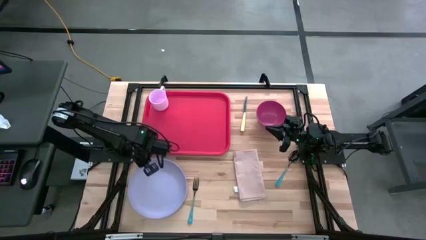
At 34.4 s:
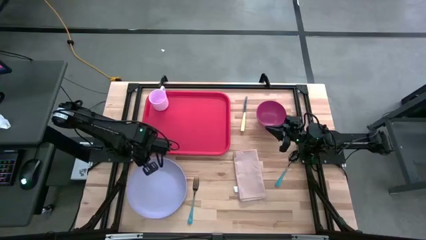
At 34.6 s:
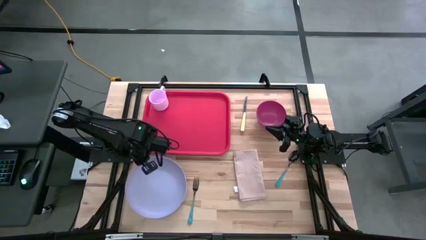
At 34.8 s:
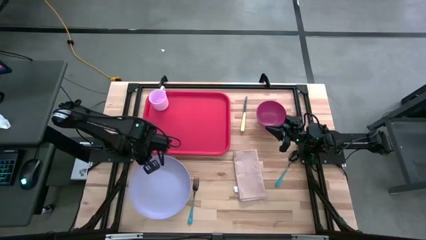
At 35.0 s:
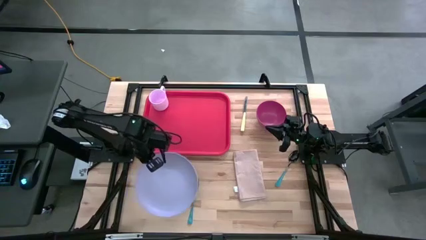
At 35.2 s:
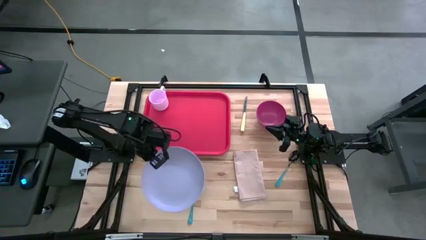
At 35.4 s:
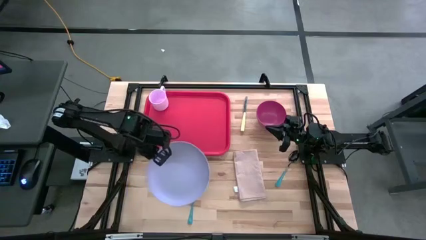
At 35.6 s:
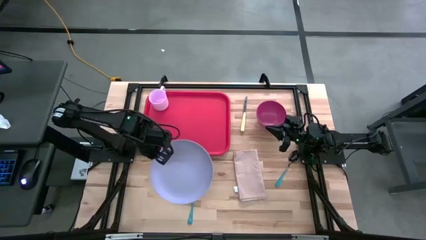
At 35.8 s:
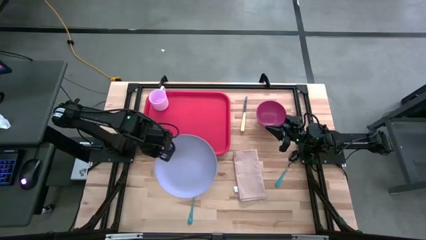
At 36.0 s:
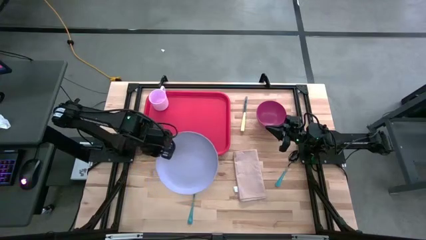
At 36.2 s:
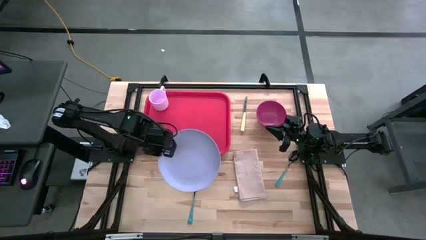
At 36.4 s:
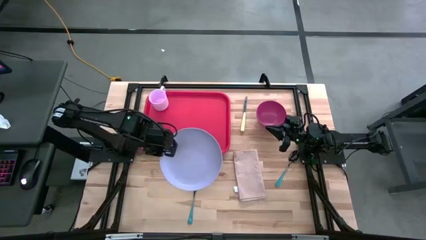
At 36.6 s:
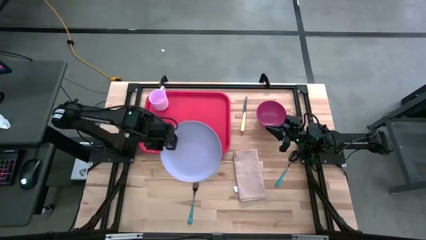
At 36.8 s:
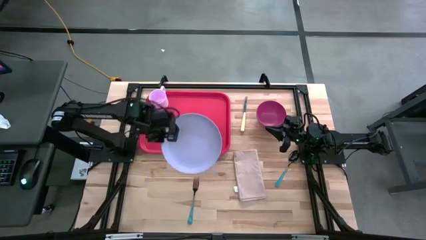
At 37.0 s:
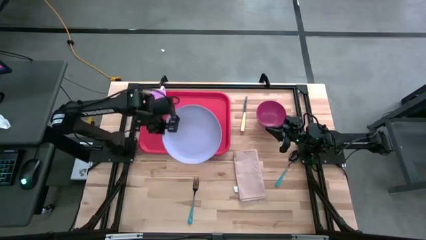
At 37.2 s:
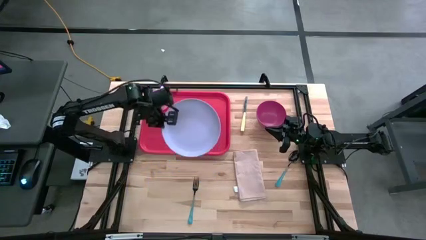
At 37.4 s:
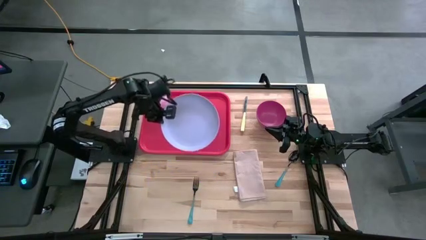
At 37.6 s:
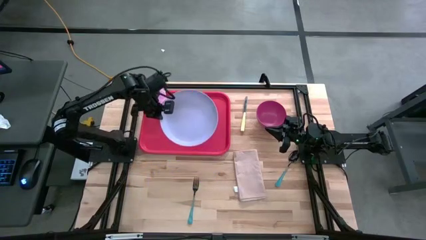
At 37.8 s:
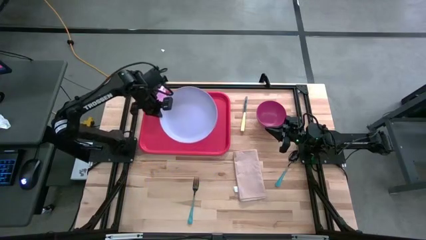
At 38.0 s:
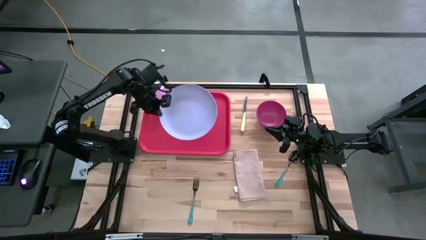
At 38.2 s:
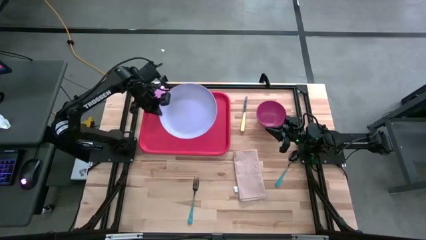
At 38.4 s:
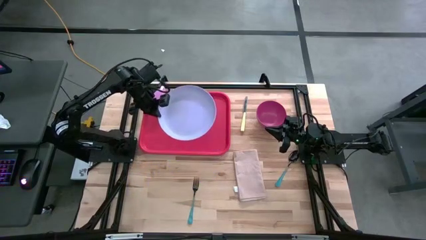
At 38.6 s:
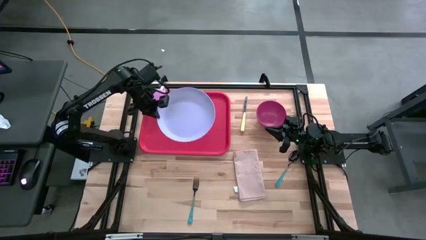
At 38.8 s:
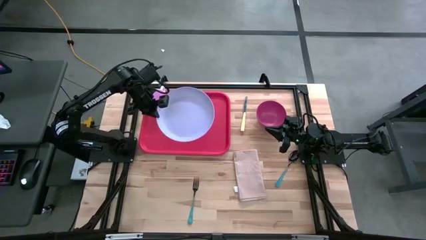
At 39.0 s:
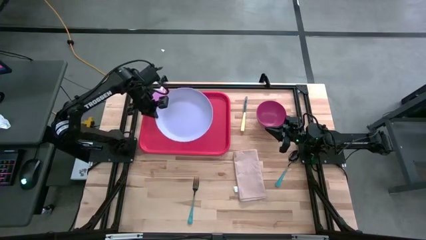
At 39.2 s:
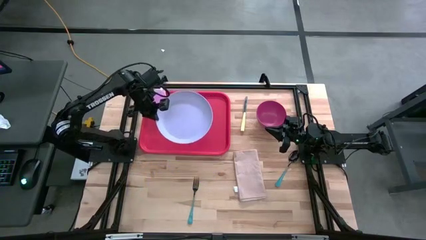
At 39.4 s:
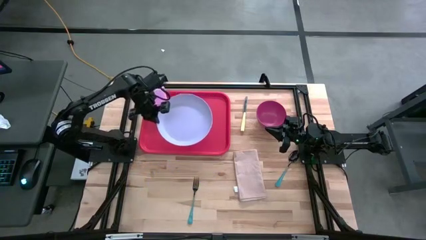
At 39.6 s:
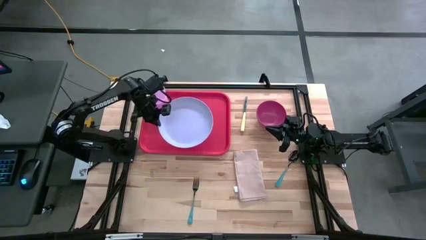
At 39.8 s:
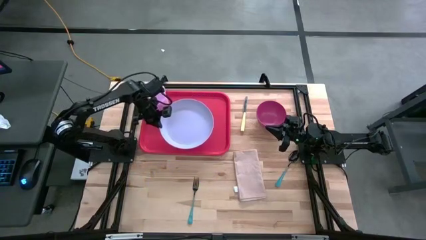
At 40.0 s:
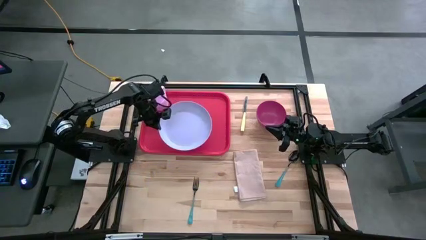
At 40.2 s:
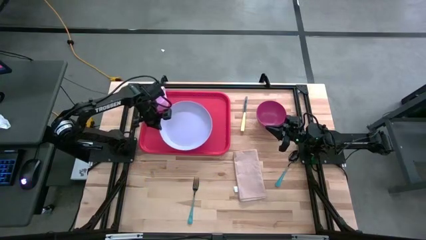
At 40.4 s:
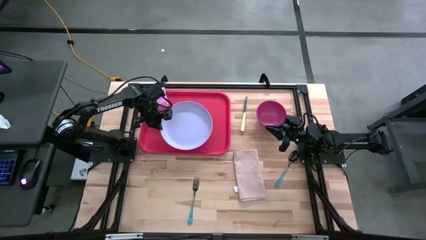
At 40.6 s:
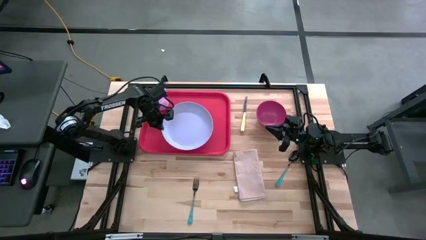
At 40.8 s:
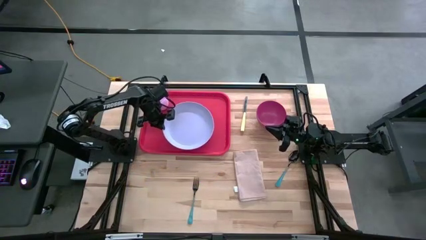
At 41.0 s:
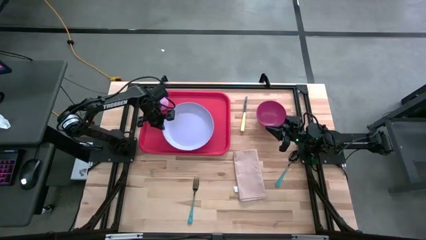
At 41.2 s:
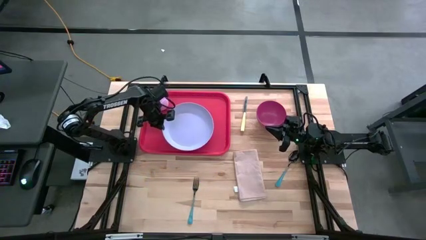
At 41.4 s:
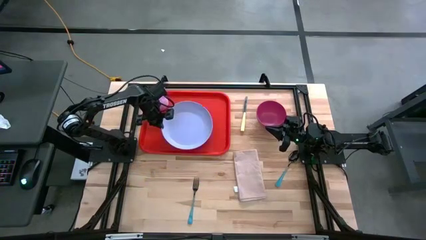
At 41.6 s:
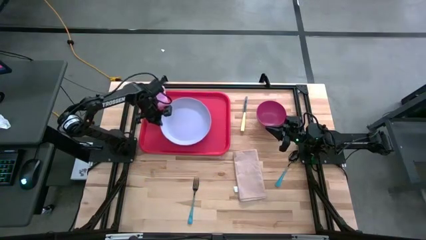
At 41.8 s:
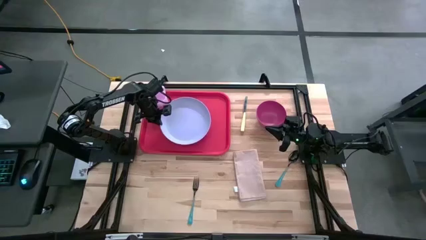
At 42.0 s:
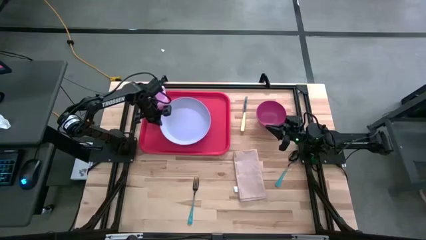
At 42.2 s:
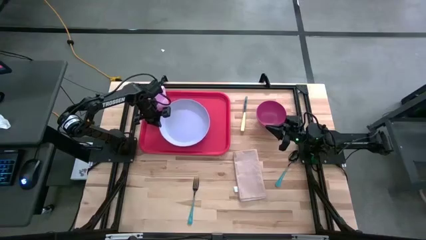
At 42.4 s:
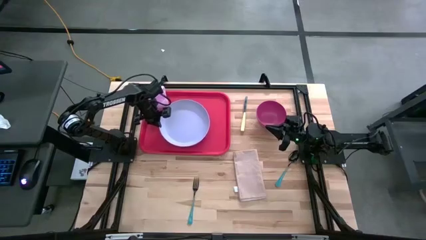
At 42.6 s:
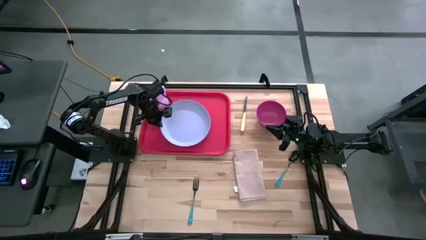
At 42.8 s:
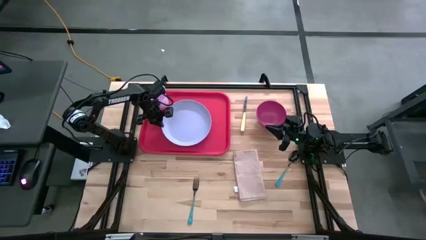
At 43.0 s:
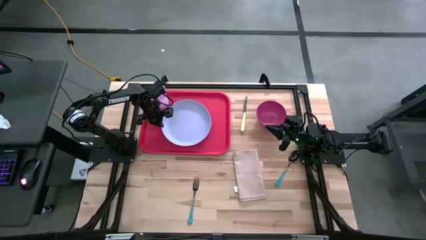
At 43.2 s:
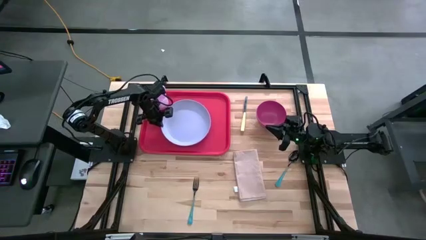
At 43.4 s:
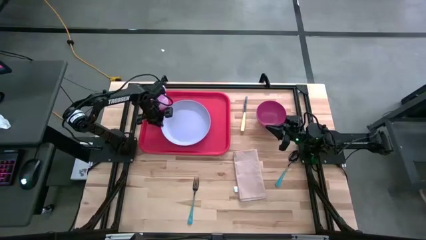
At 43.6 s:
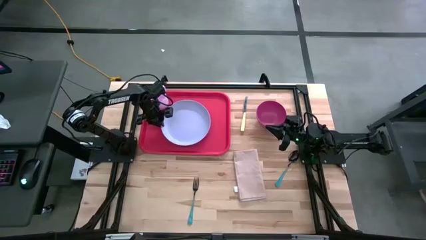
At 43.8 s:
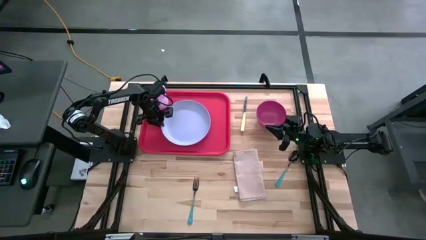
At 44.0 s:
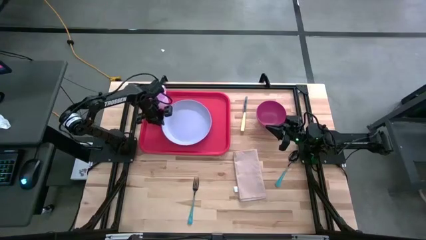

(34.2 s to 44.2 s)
Task: Set up tray
Put the purple plate on the red tray to the bottom right of the pink mug

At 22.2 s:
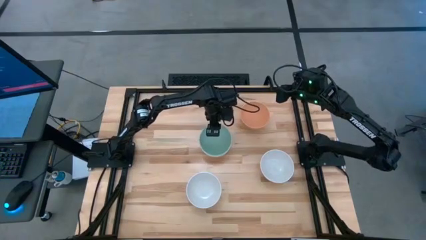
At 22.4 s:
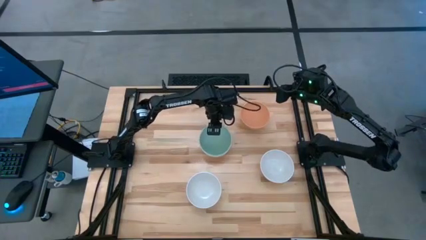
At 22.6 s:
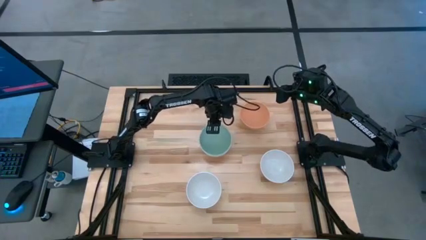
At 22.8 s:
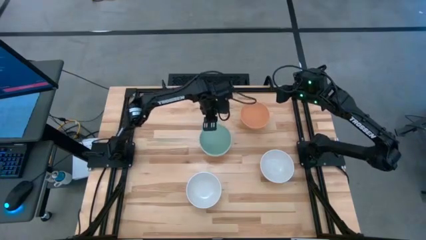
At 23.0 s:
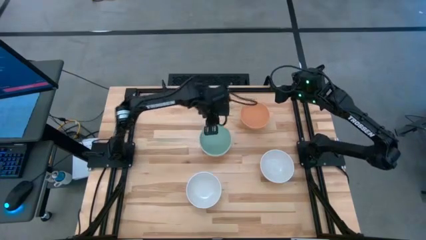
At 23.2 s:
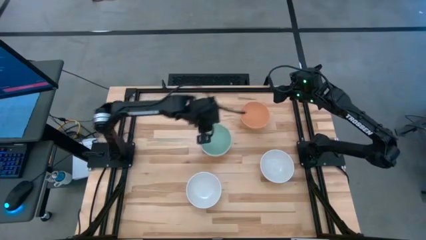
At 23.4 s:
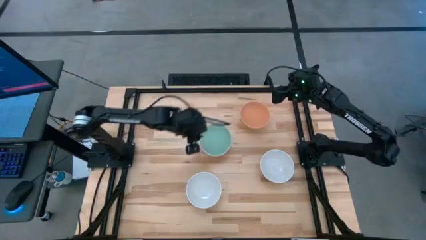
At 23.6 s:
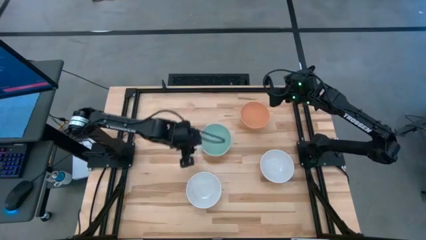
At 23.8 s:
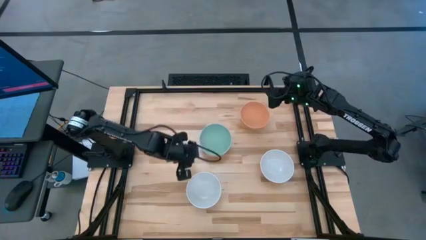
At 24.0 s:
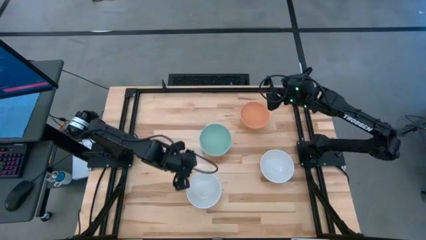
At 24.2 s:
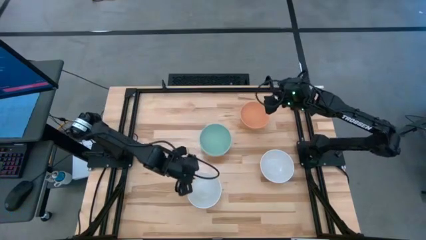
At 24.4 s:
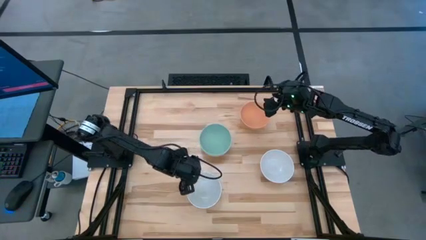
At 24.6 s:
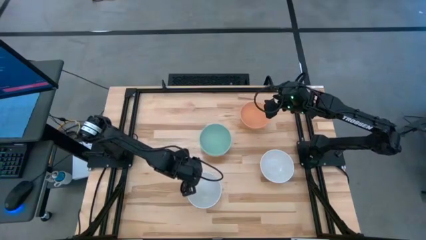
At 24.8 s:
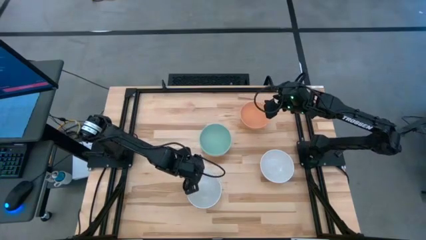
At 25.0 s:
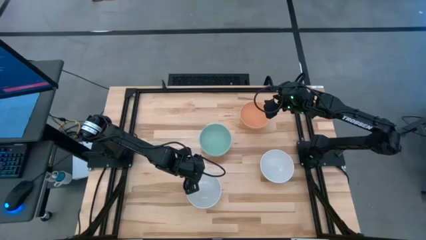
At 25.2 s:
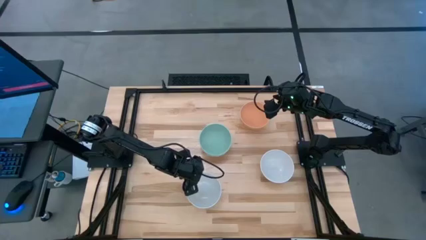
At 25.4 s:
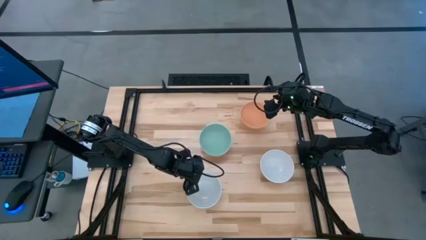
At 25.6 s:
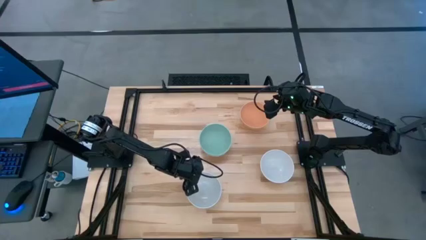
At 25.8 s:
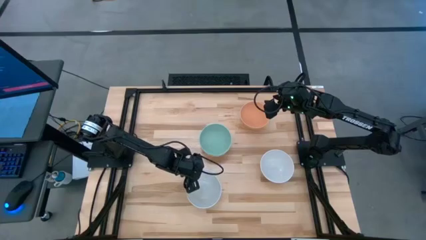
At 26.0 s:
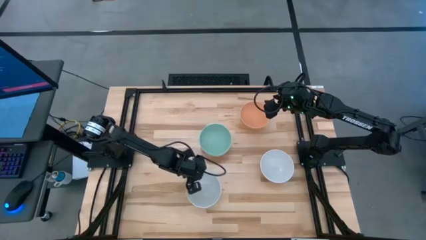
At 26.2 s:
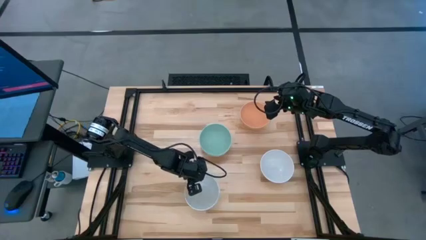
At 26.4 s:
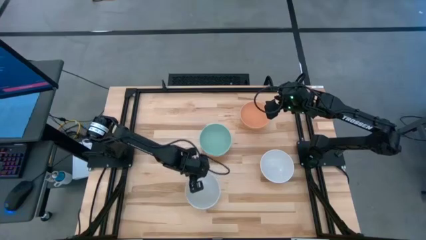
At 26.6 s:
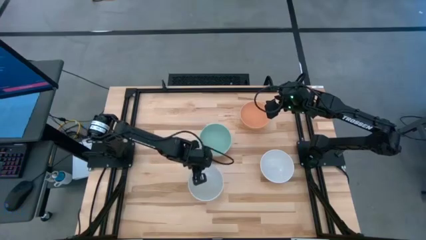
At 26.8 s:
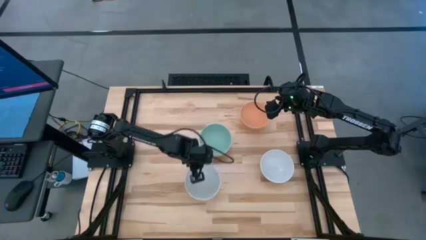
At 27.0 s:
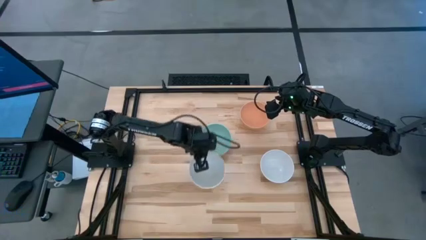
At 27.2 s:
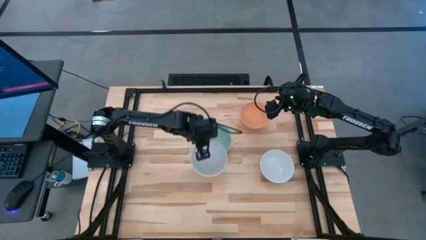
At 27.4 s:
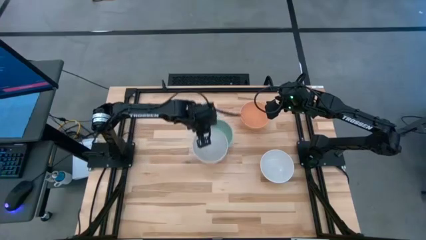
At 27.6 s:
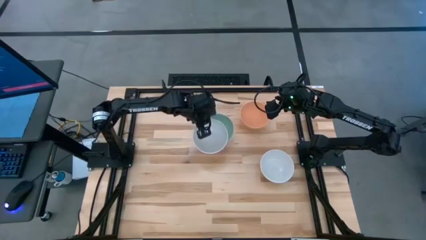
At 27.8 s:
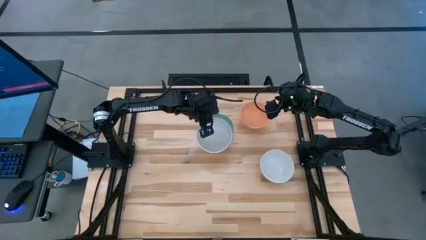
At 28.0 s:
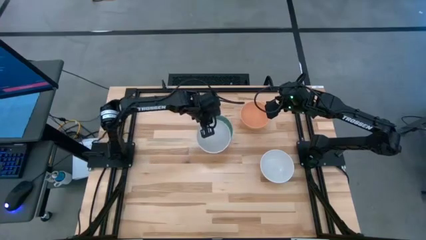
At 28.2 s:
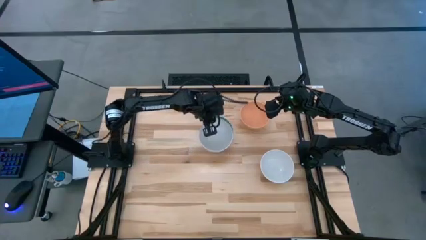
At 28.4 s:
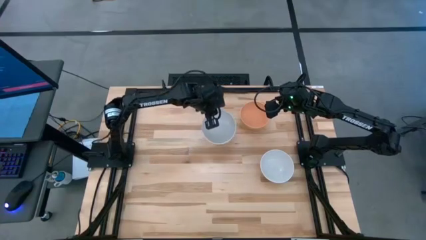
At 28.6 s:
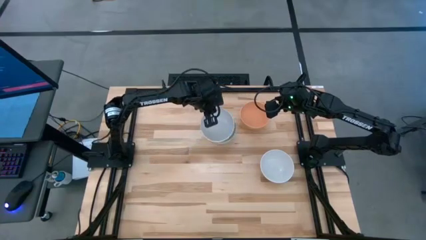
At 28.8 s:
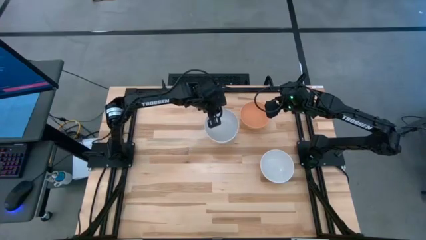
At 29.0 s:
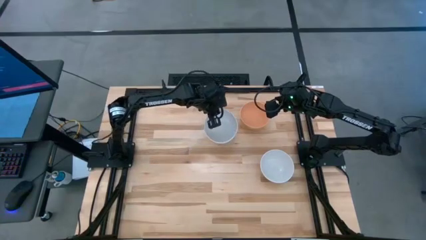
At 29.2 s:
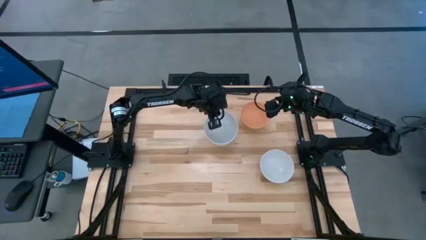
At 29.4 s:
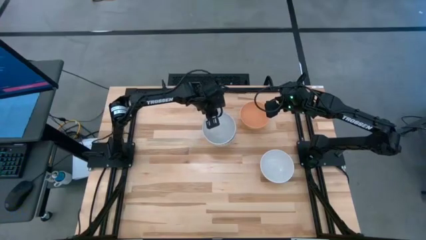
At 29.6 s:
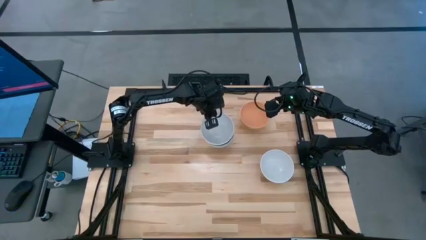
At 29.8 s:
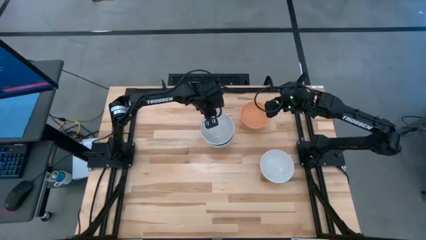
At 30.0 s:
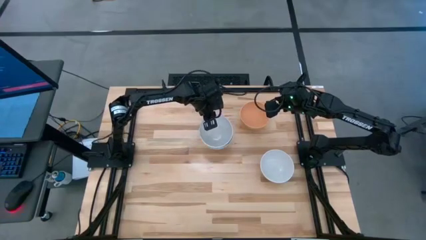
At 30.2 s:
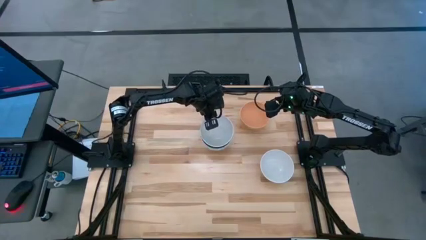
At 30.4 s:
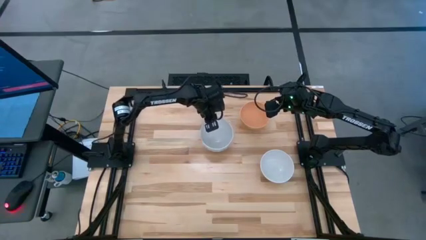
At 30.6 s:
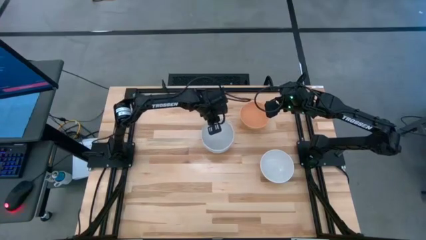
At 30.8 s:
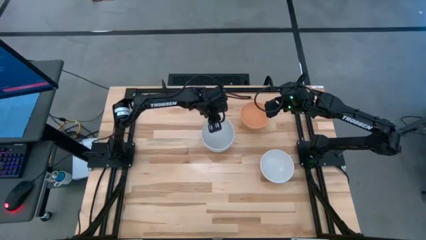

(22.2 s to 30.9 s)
Task: Nest bowls inside each other
Stack the left white bowl on top of the green bowl
